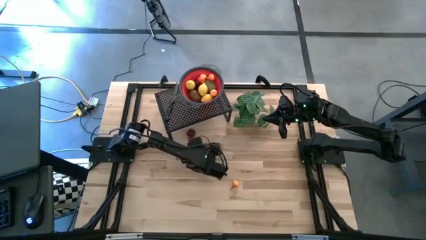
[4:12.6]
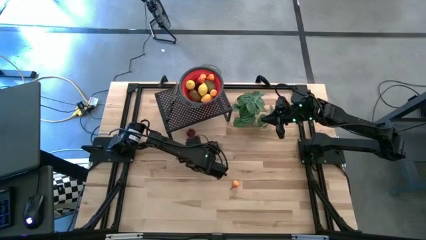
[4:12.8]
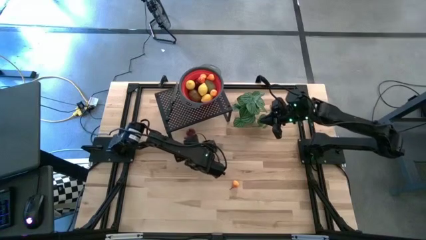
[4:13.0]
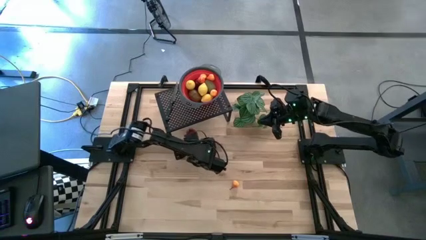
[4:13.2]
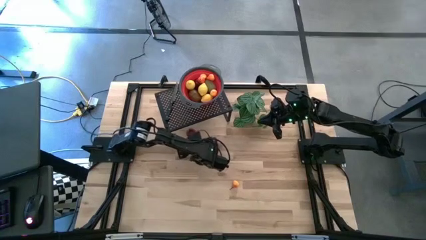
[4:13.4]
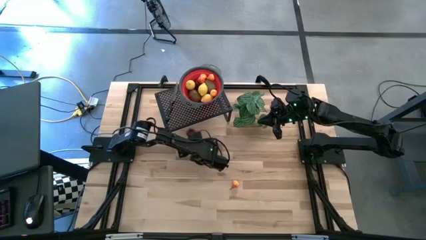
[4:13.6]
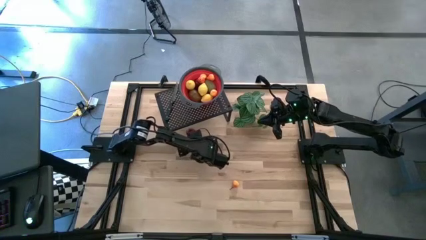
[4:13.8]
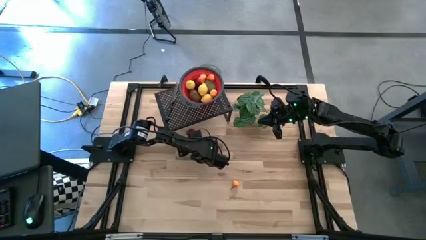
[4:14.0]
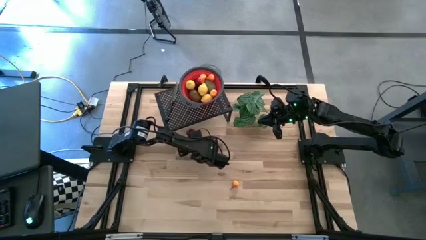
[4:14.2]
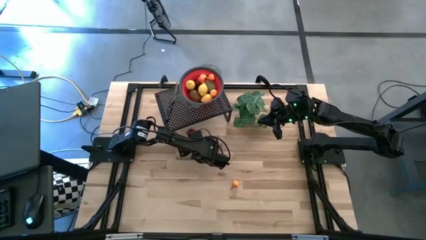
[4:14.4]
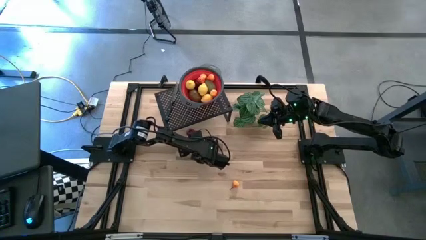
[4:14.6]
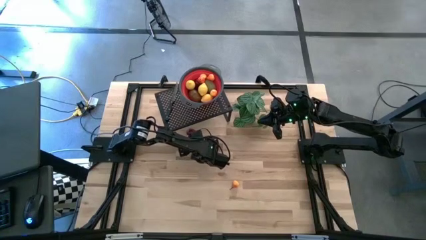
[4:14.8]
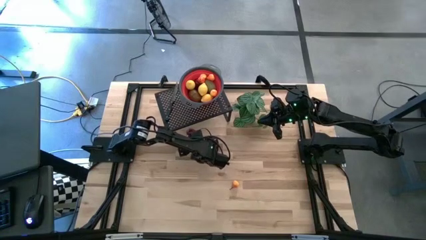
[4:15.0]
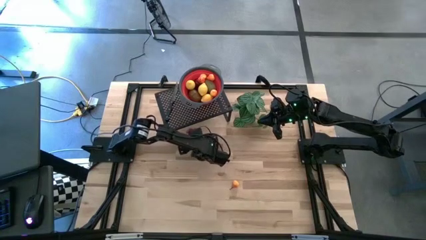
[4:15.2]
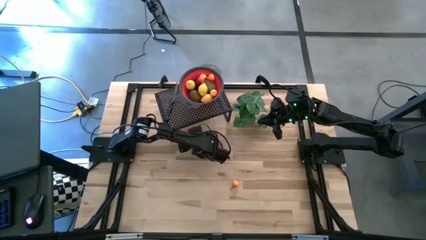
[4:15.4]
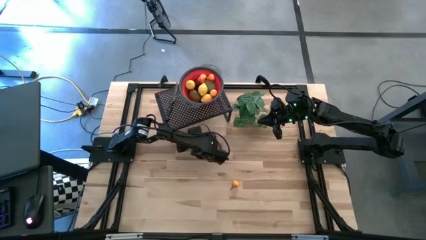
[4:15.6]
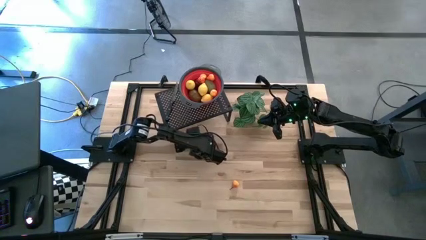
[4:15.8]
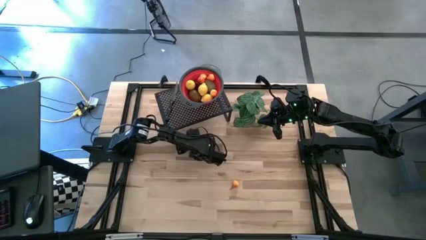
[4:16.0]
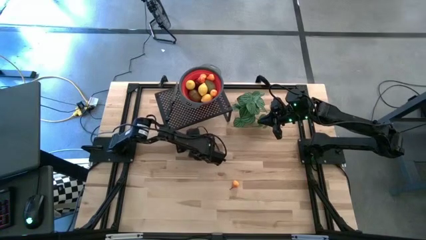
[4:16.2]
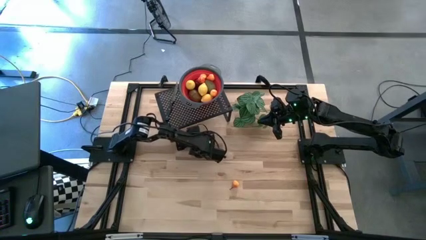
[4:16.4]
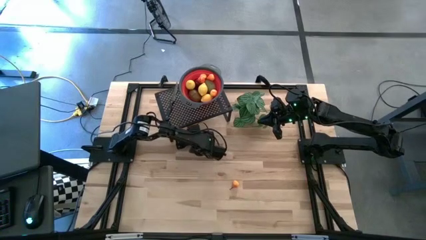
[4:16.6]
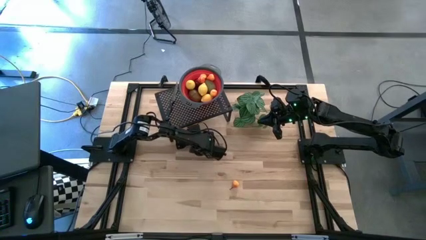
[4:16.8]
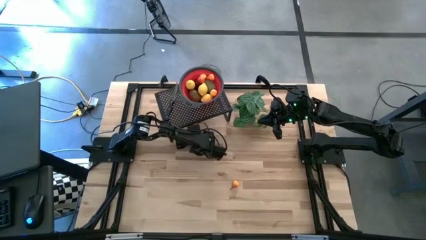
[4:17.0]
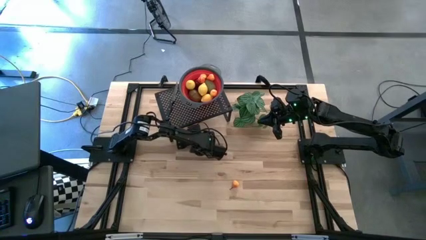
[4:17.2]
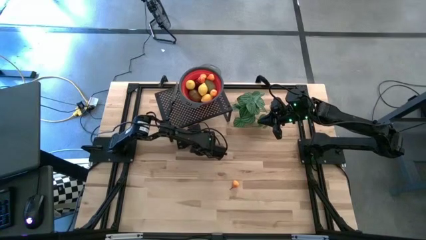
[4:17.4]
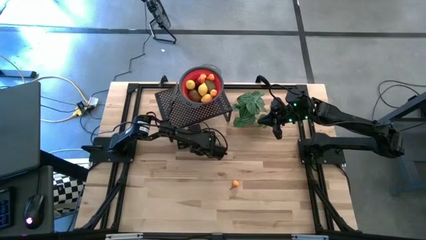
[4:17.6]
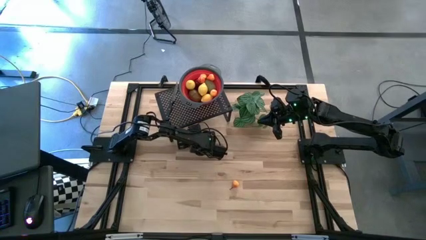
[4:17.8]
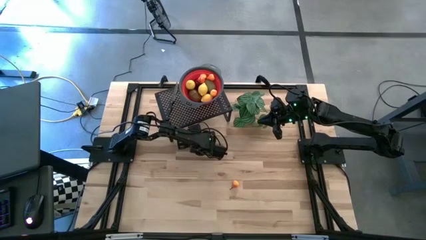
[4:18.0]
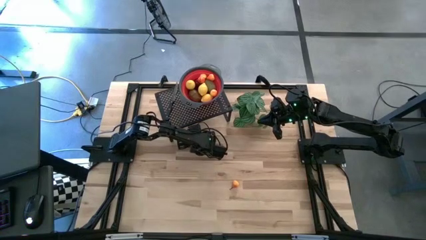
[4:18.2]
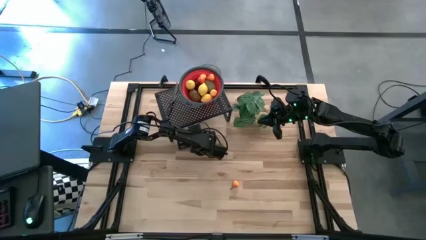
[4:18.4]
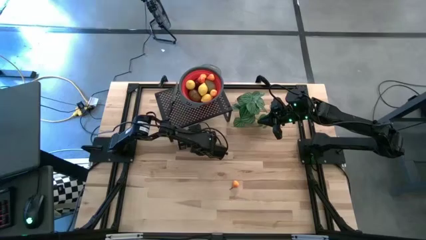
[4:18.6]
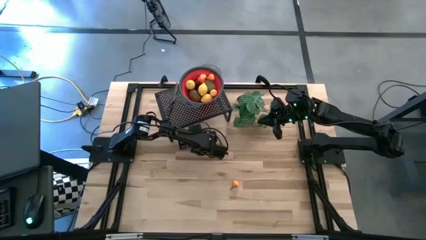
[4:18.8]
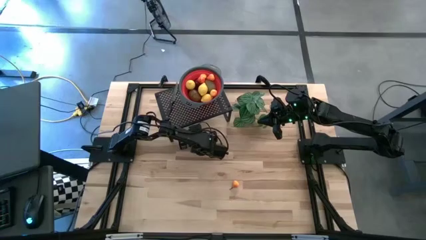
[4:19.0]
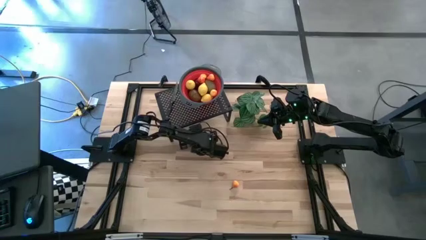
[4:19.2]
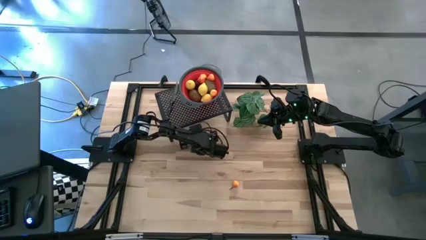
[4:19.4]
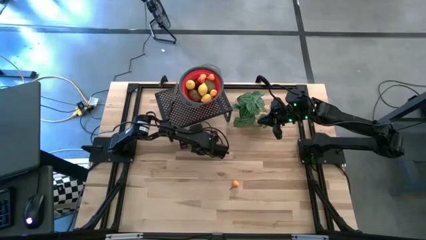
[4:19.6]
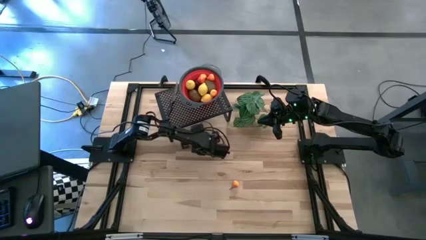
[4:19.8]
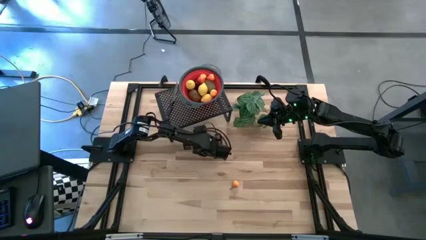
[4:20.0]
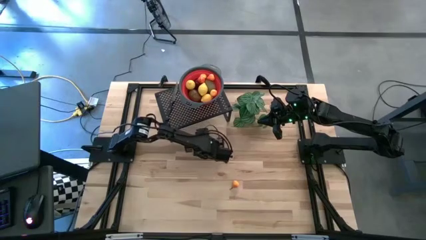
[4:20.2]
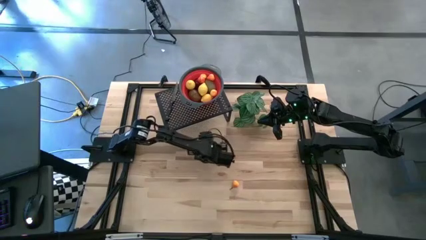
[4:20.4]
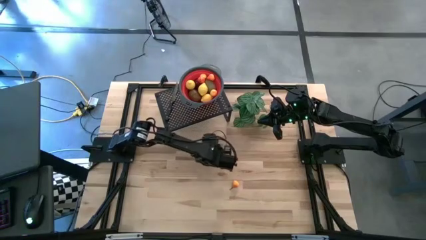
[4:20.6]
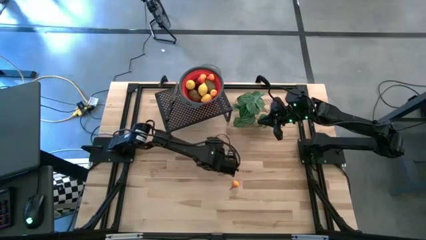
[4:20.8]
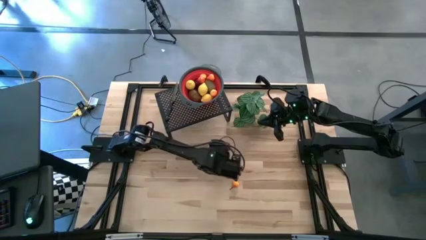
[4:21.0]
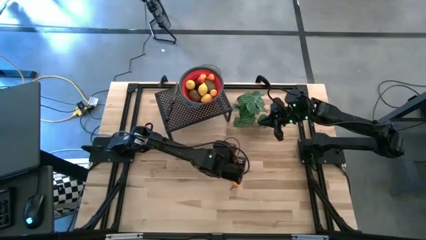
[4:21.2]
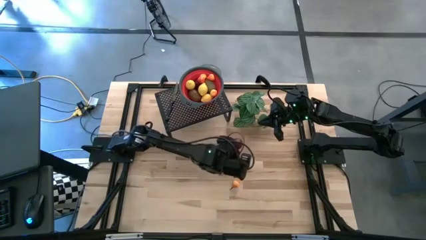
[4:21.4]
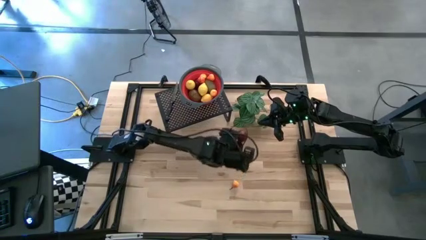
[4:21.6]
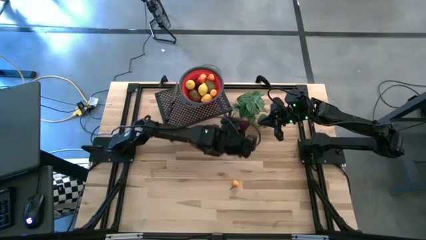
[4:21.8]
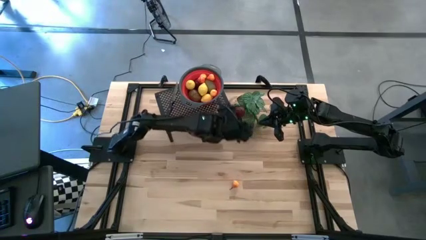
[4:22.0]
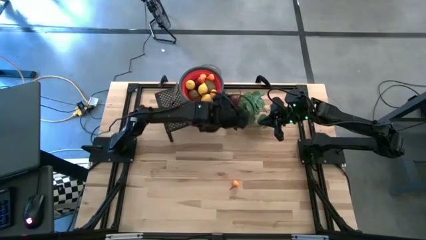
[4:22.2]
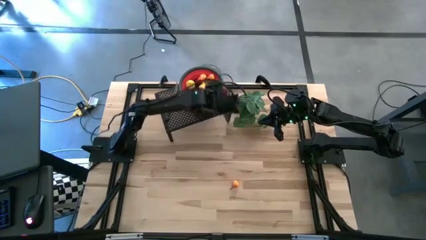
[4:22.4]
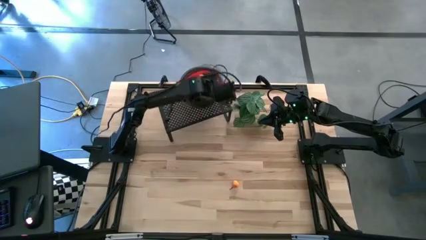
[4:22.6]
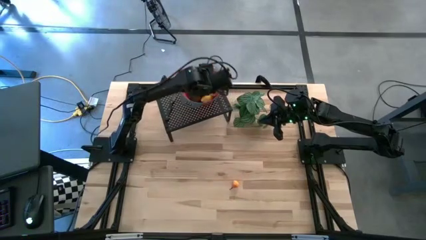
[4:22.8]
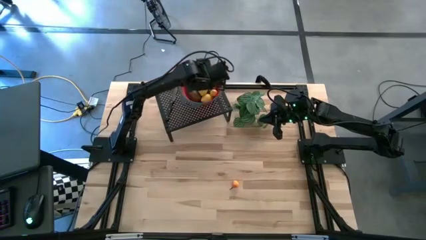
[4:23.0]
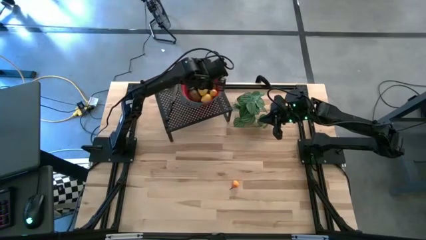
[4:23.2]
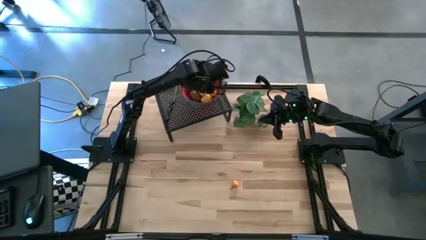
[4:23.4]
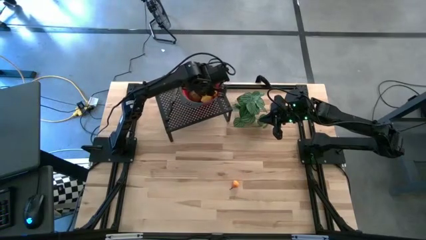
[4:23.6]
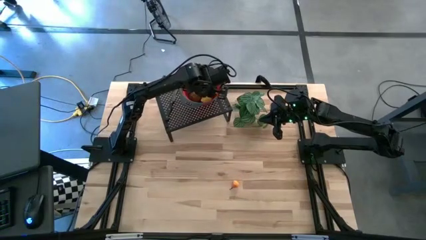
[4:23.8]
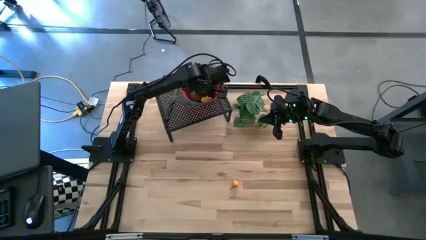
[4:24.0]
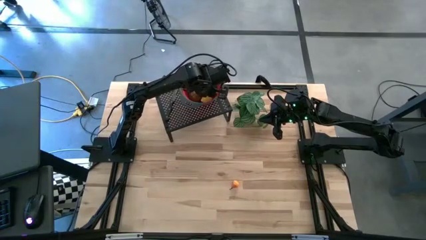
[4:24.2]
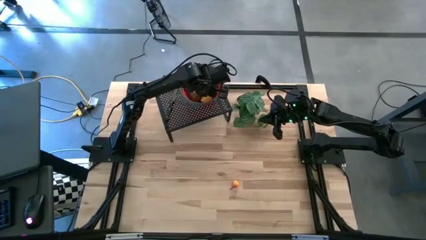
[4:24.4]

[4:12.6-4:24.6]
Task: Pick & Place Fruit
Put the red pomegranate into the red basket on the shelf
